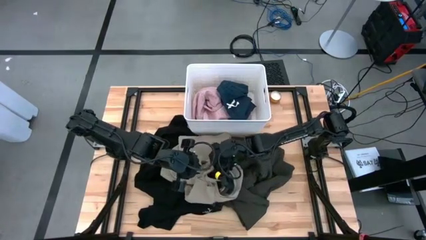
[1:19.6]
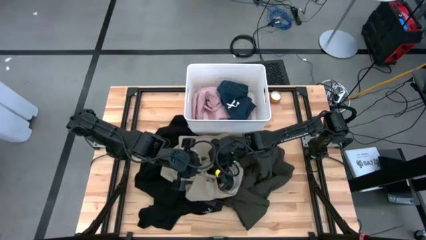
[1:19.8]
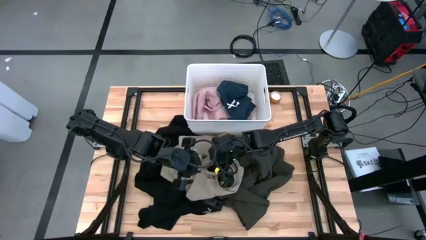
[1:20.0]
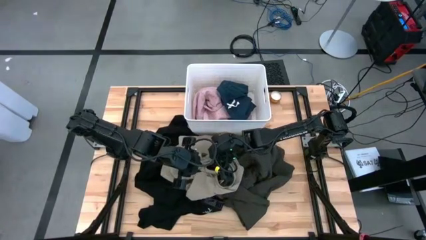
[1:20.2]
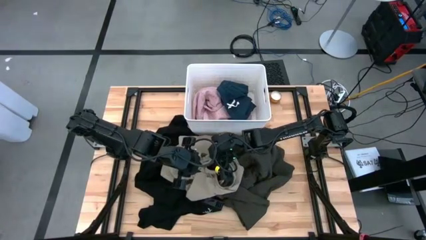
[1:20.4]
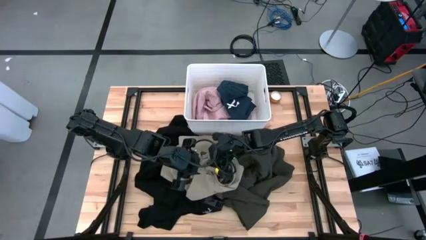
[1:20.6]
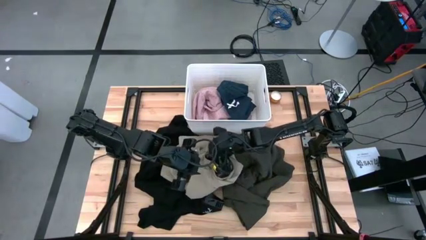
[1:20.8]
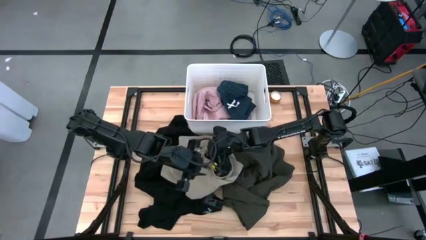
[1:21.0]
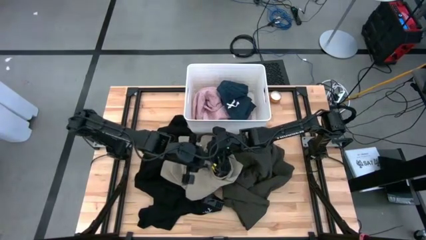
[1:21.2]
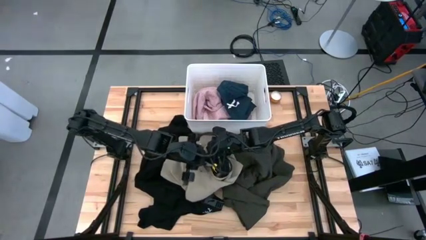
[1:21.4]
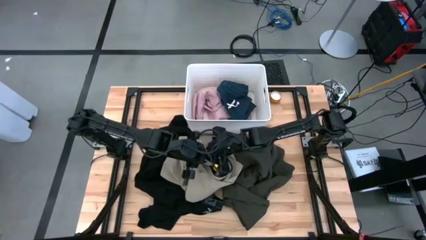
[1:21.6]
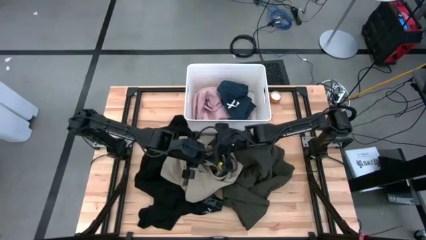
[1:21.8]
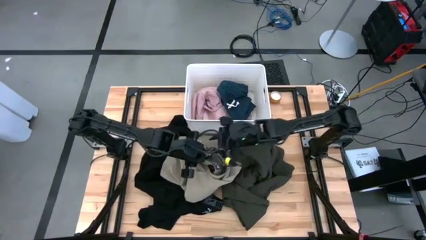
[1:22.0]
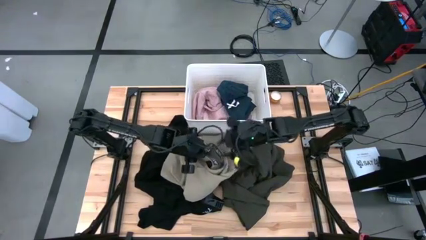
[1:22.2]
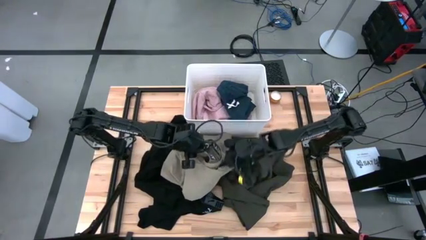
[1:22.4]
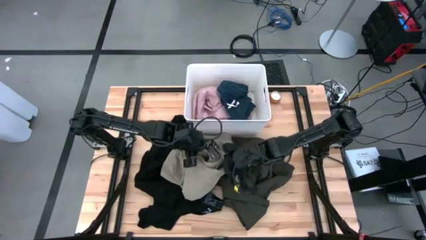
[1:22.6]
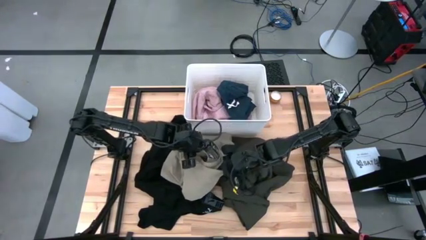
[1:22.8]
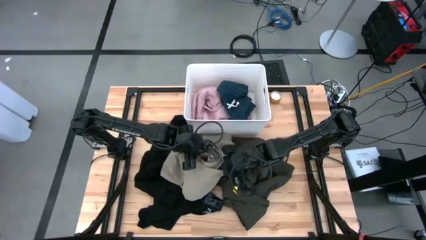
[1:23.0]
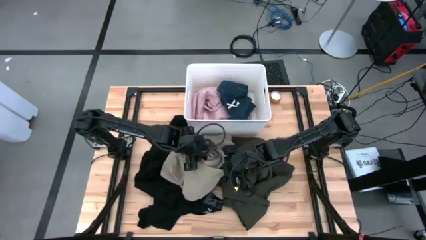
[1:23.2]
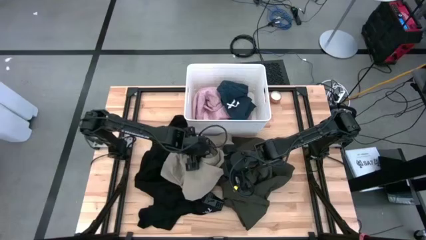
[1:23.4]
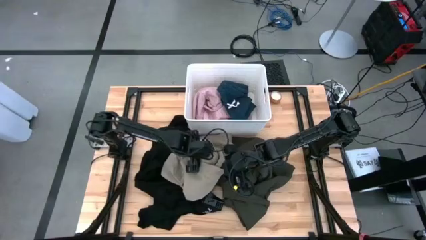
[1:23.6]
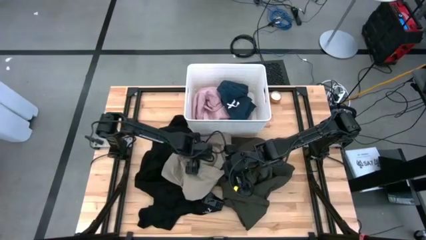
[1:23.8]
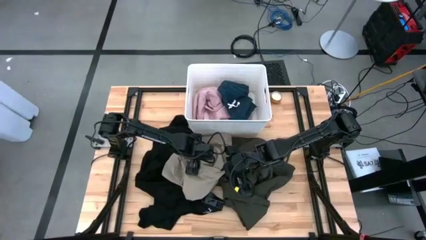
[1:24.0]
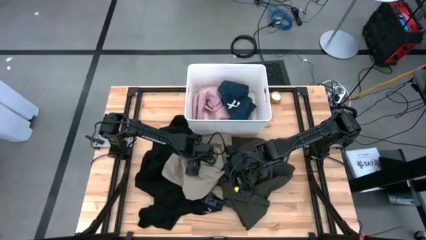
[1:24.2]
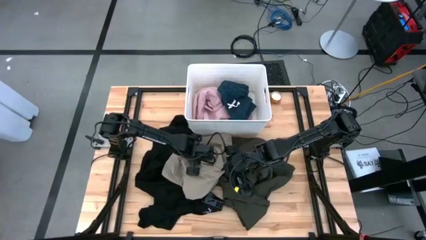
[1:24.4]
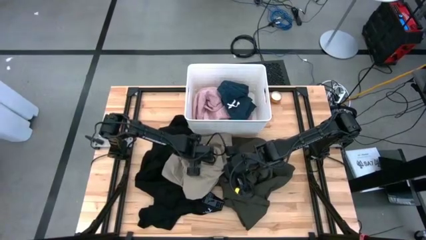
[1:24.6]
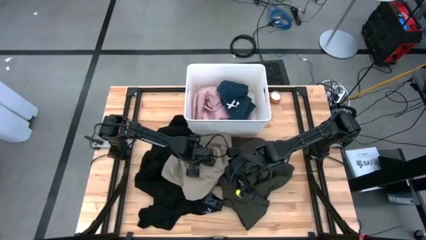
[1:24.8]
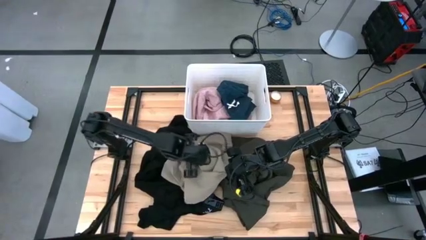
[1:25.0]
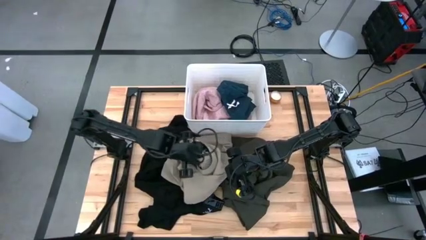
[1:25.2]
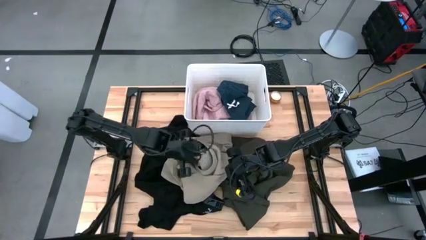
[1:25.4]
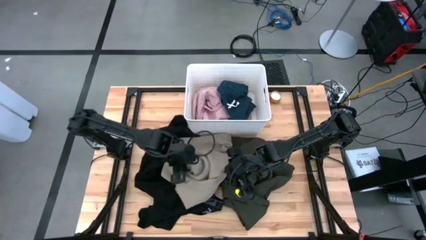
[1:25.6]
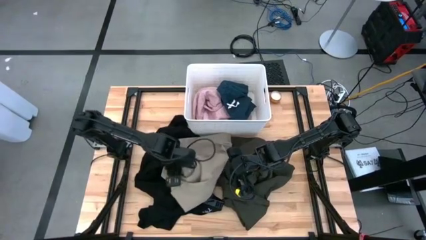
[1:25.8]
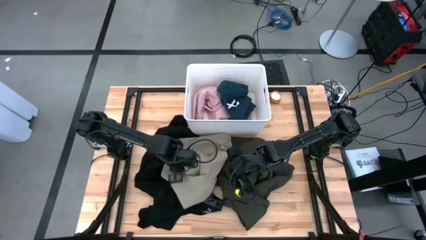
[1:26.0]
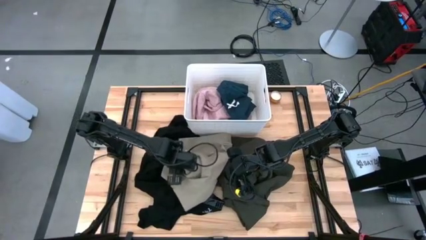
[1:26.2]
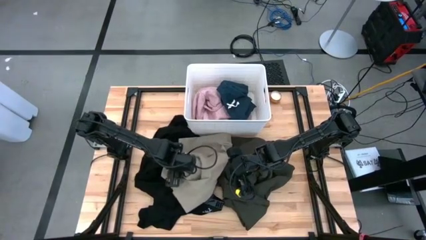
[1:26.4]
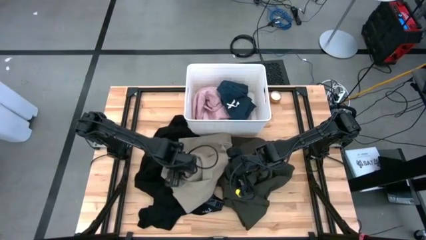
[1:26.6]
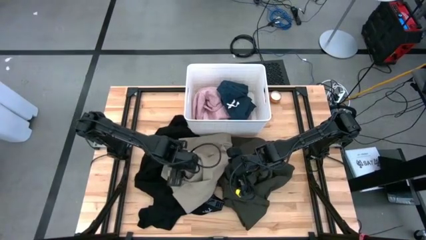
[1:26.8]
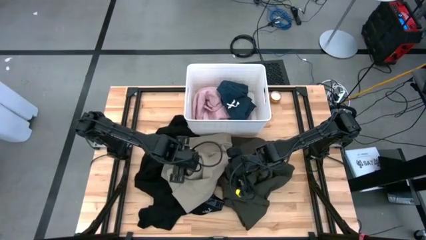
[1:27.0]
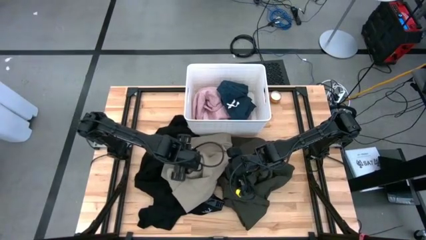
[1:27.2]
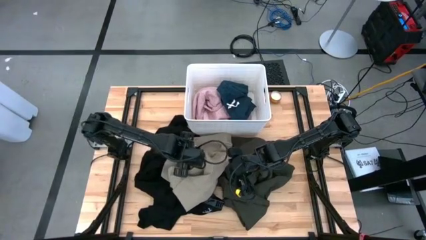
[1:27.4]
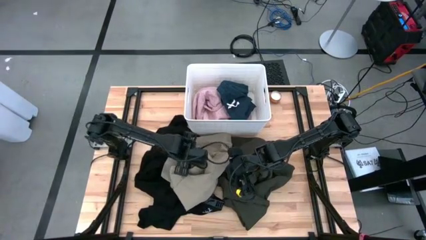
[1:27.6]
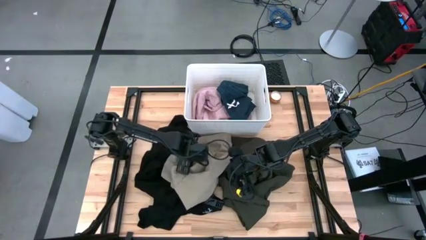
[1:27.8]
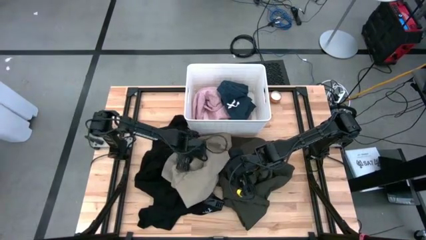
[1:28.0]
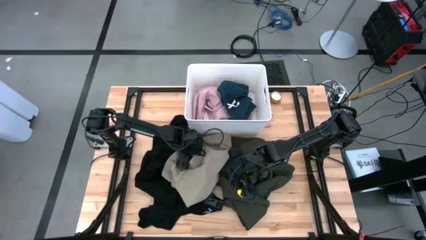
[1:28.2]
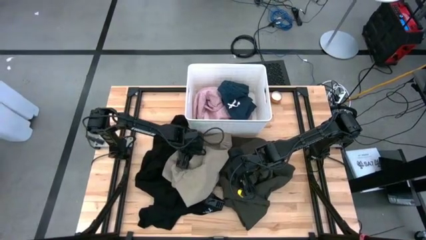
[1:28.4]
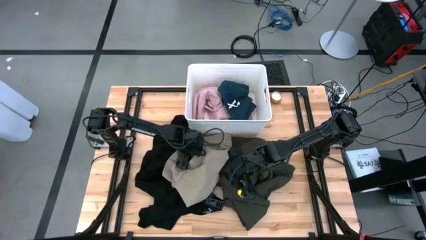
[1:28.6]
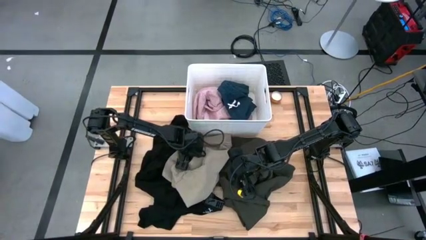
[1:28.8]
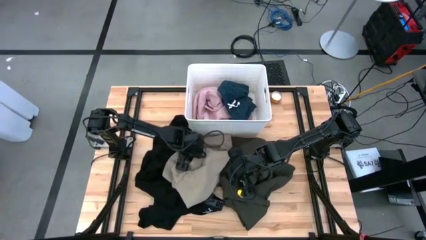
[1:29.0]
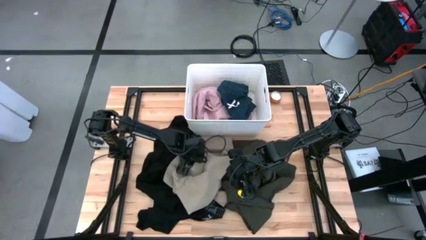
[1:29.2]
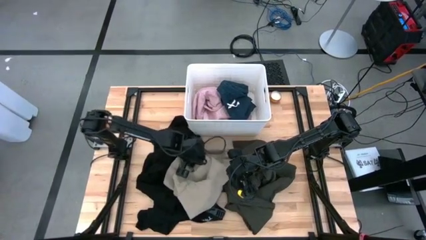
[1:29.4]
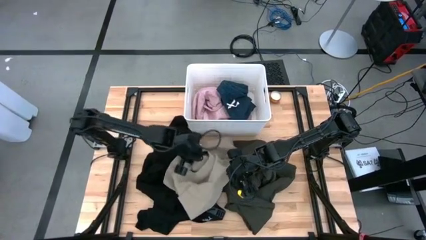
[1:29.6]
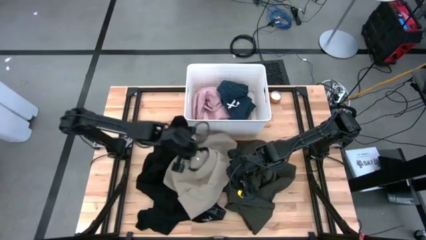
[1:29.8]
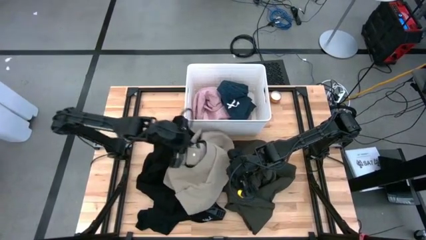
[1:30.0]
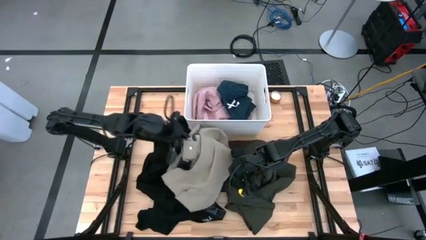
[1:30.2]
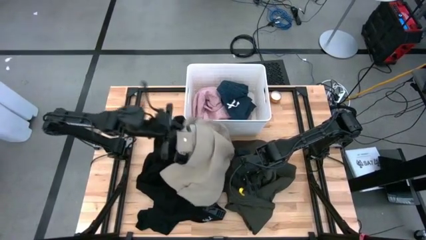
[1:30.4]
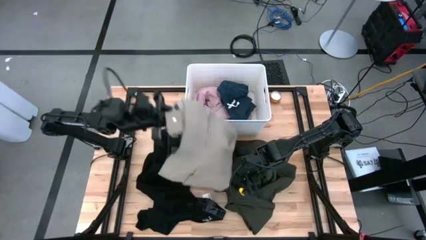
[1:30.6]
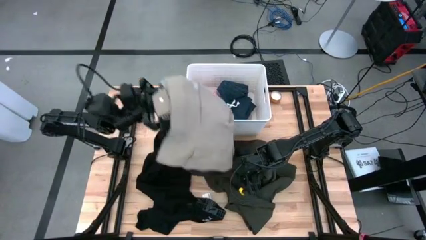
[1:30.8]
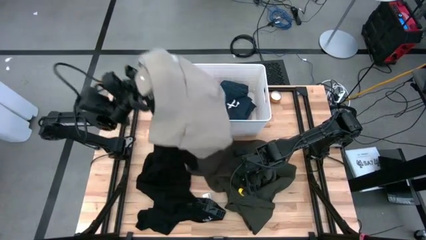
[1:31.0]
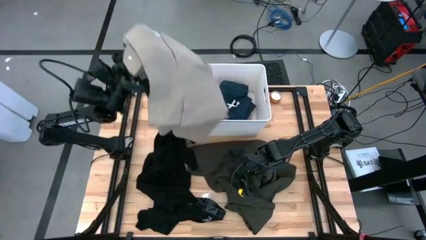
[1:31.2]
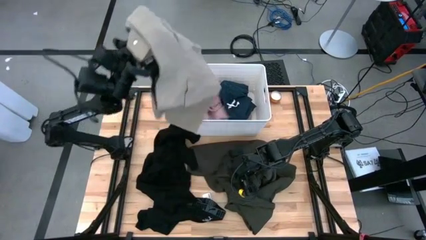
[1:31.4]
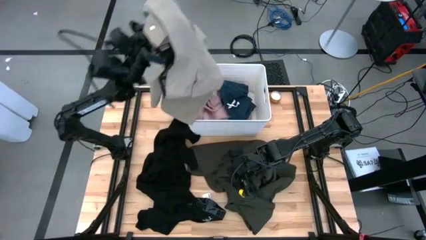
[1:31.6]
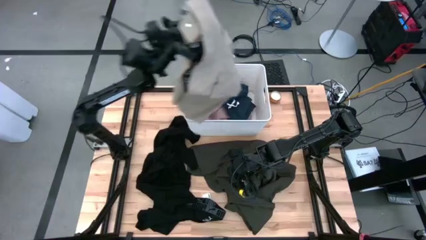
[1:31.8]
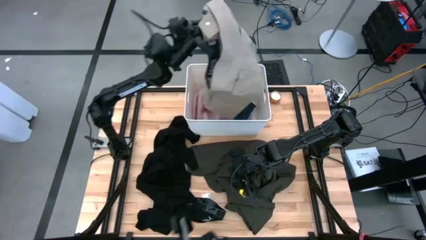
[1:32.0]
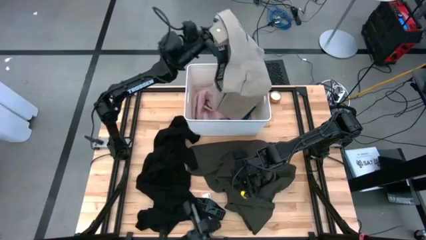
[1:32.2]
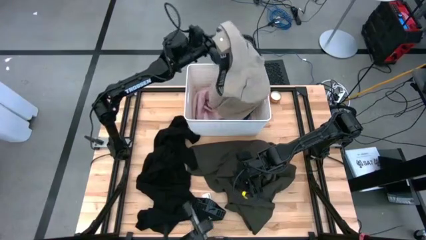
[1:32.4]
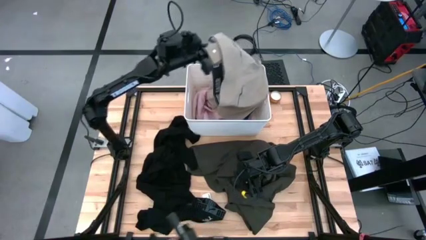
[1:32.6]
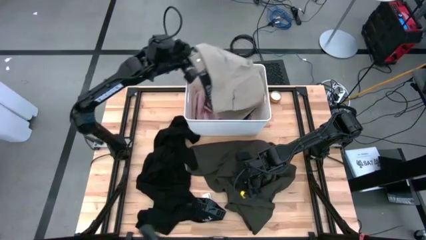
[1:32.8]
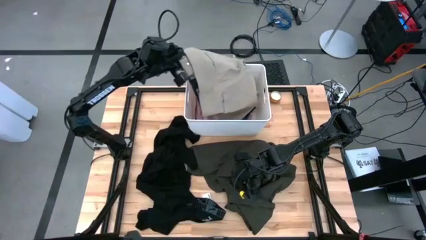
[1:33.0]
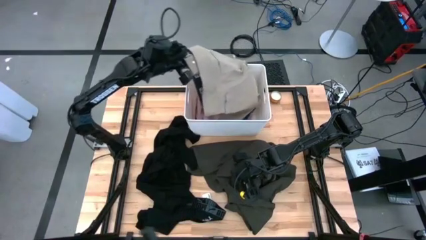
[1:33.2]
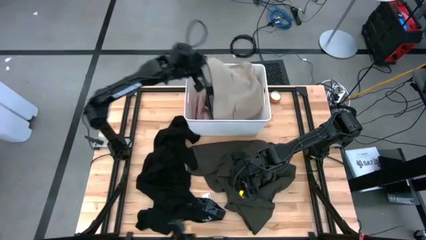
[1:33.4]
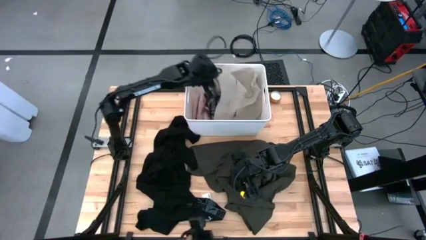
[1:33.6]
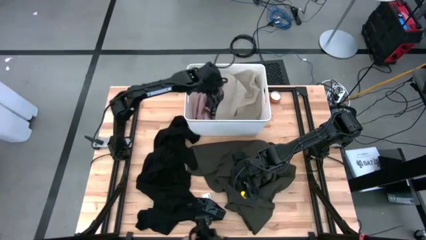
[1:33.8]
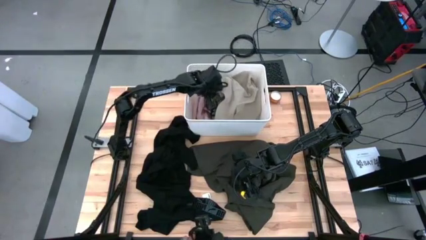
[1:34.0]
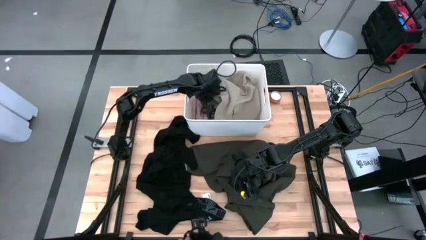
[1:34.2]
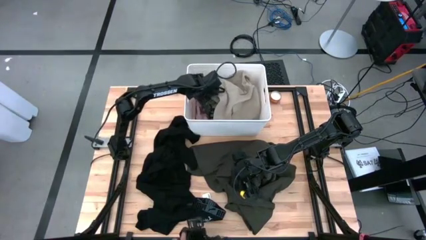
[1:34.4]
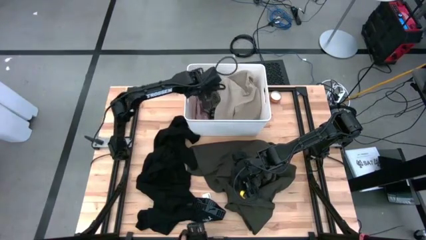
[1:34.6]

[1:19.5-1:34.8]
Task: Sort clothes
Put the brown shorts into the white bin
